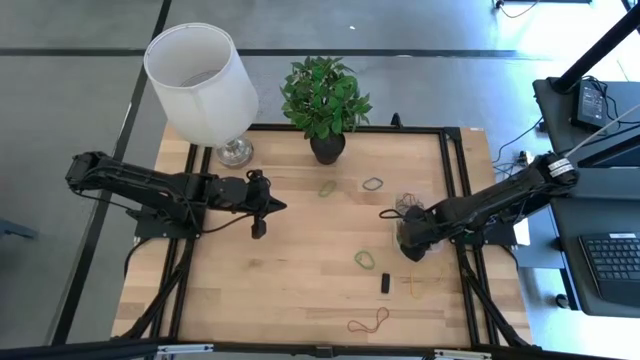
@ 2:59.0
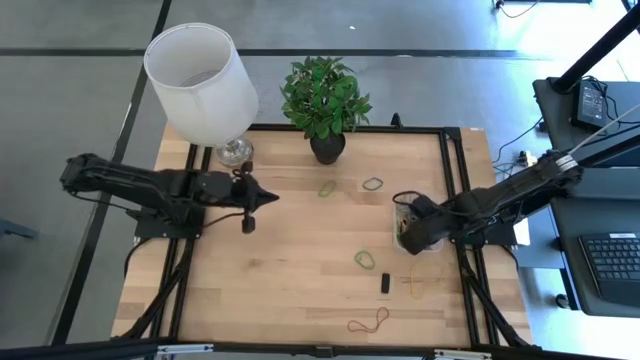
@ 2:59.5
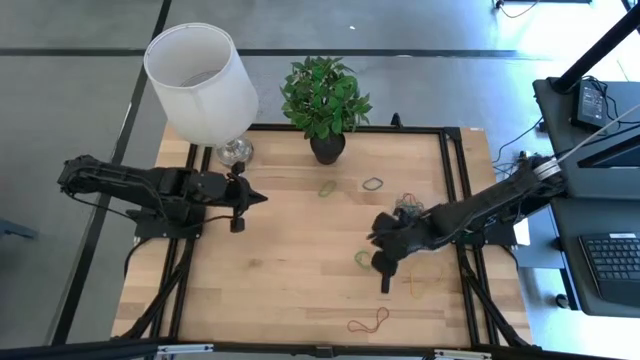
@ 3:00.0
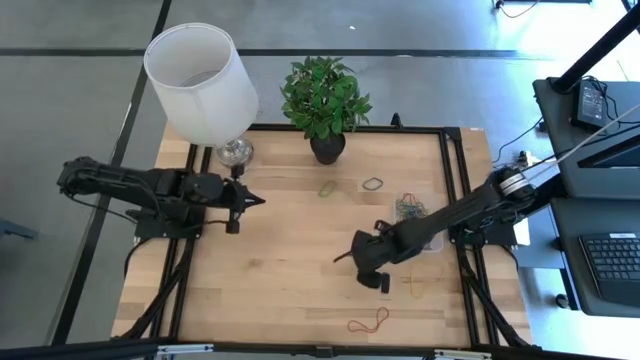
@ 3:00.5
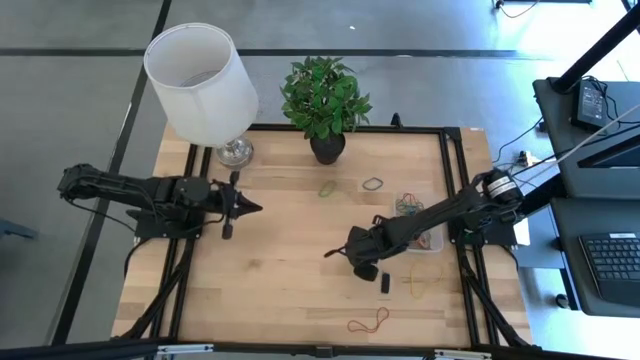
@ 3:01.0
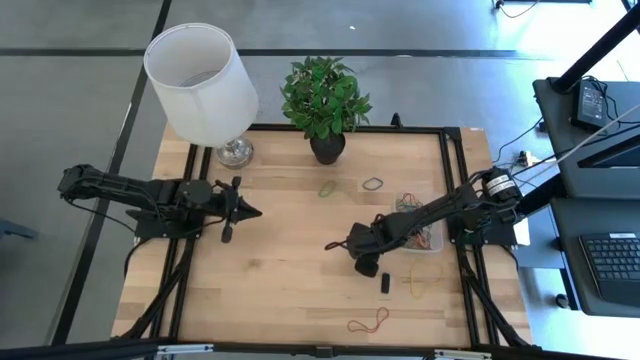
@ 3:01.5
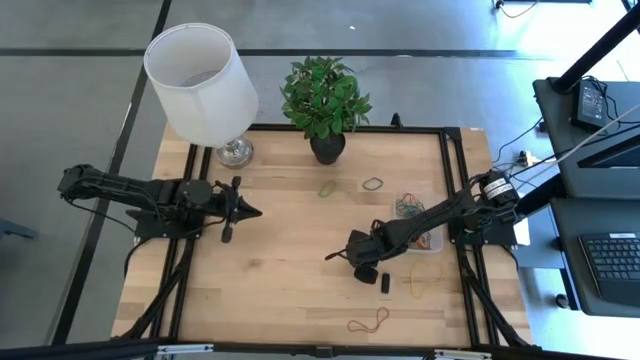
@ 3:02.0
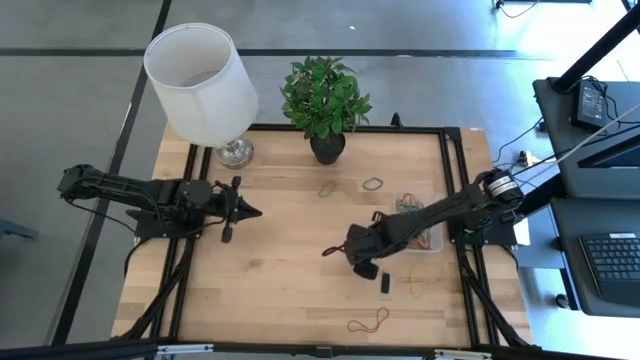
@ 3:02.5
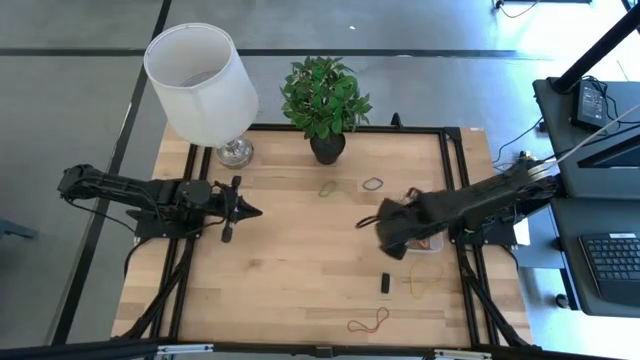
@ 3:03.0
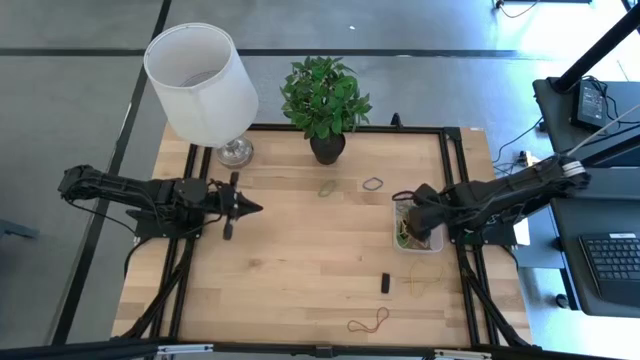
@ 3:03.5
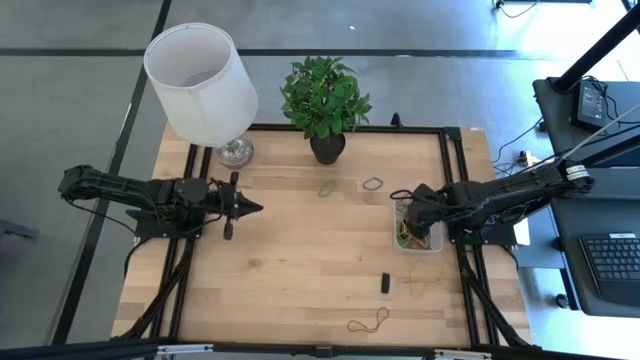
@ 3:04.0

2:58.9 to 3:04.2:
Task: Pick and place rubber bands into bin
Put the green rubber band into the transparent bin

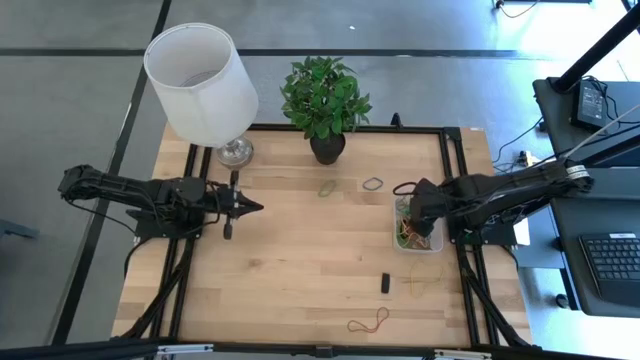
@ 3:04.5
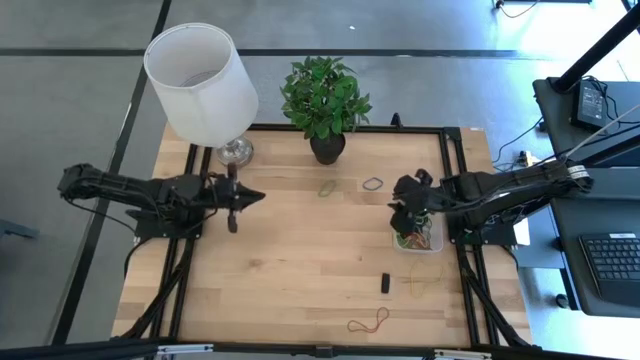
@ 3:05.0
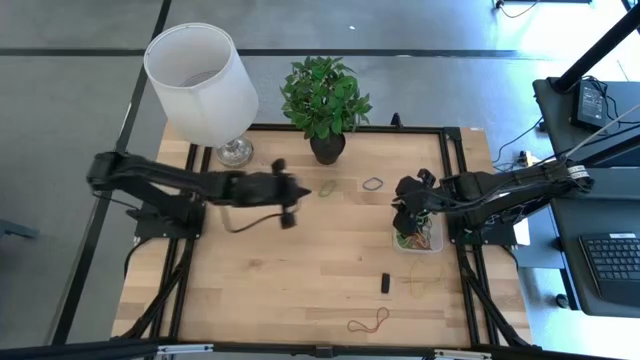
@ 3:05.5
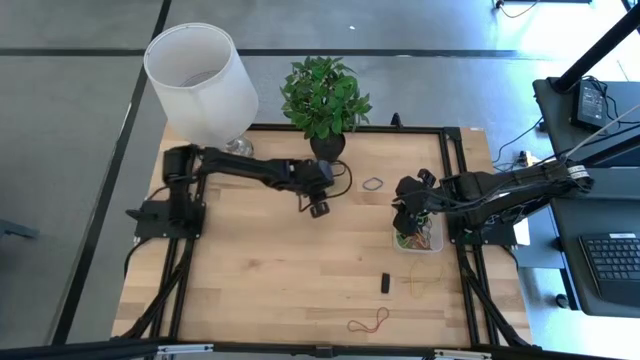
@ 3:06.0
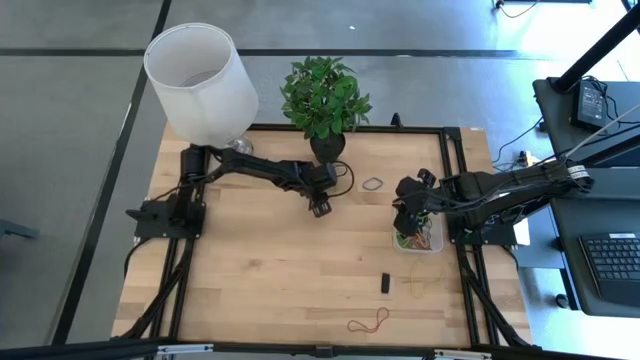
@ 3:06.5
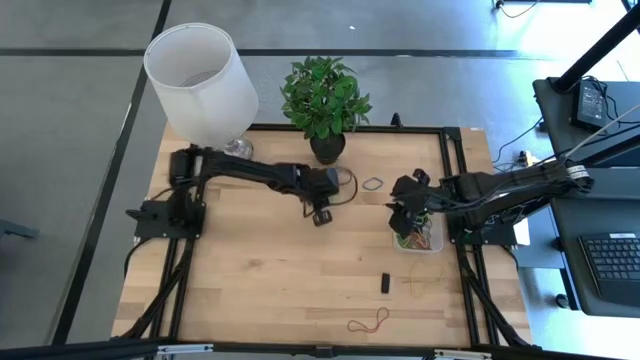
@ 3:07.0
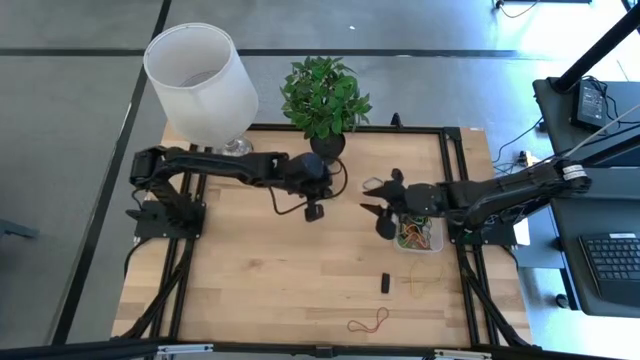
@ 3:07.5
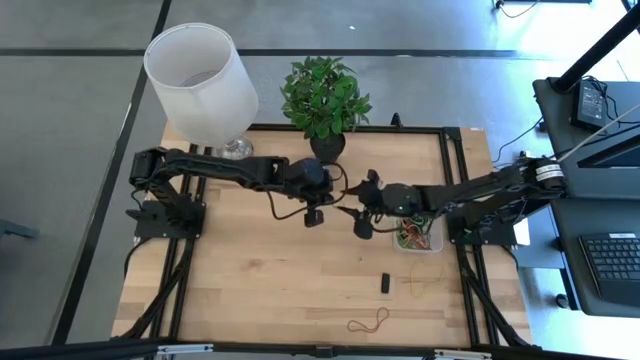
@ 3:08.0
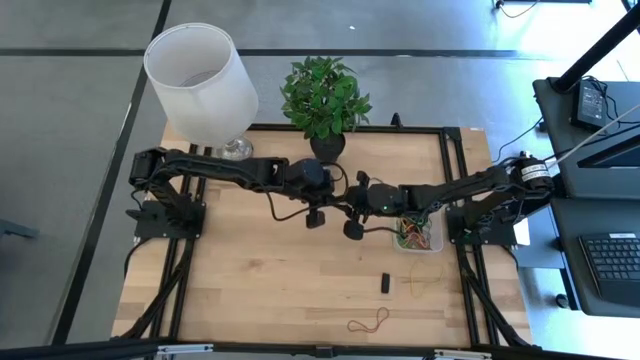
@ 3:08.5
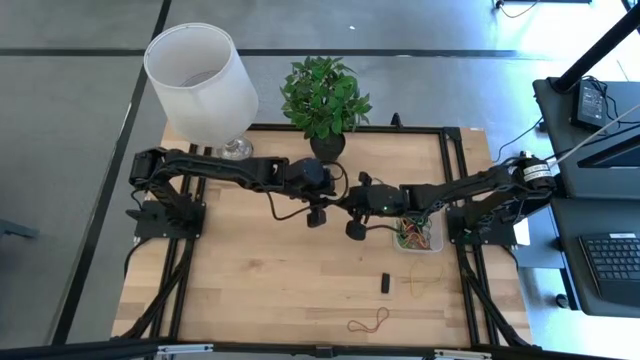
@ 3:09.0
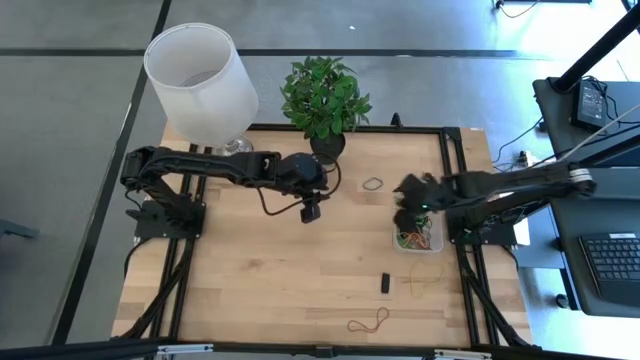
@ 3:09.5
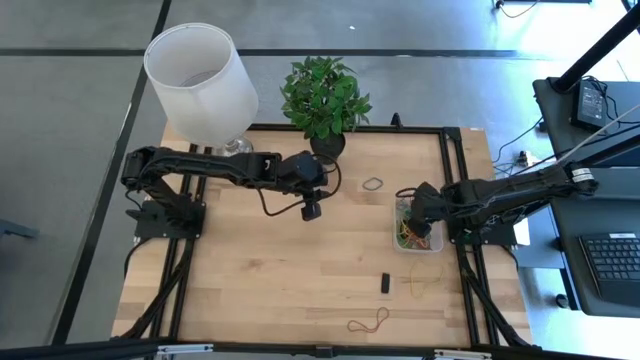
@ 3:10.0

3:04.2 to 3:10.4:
Put the green rubber band into the transparent bin

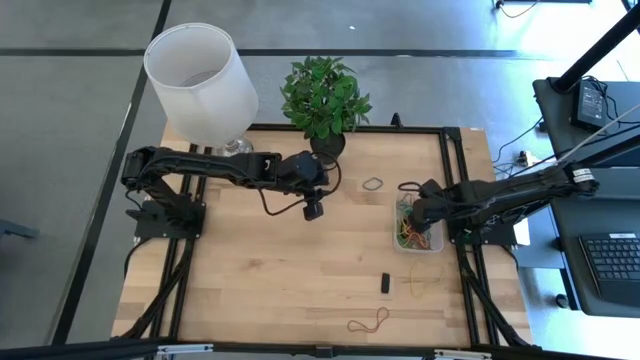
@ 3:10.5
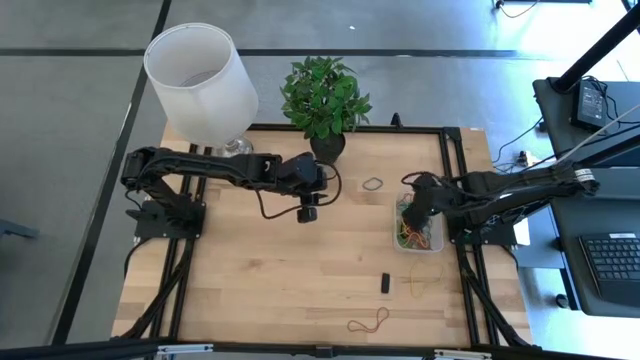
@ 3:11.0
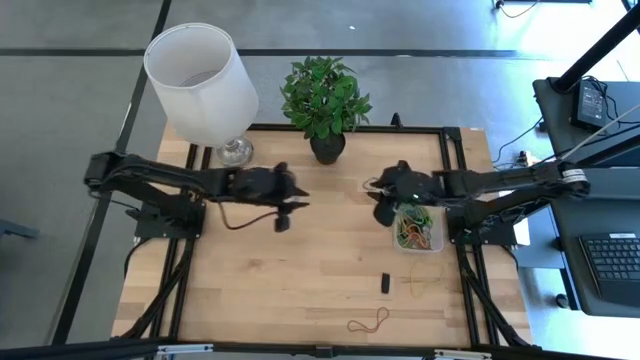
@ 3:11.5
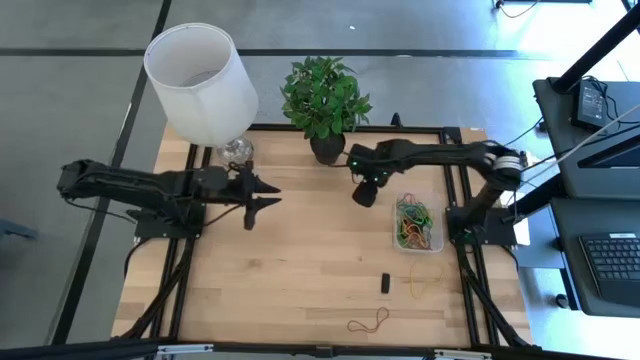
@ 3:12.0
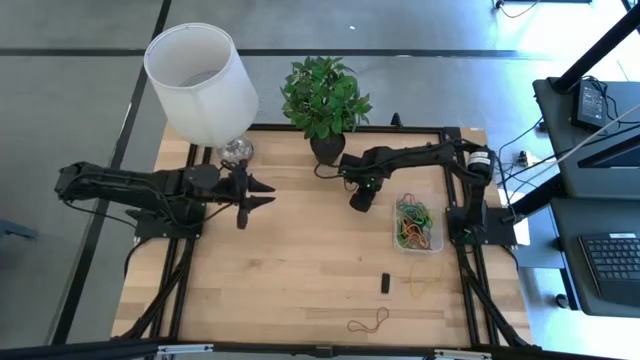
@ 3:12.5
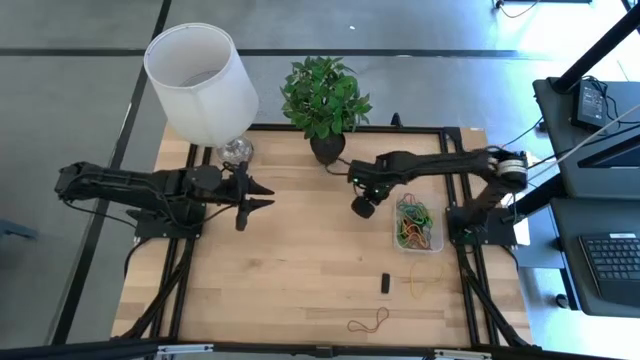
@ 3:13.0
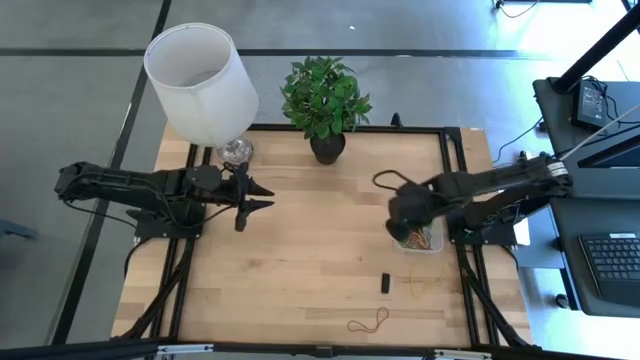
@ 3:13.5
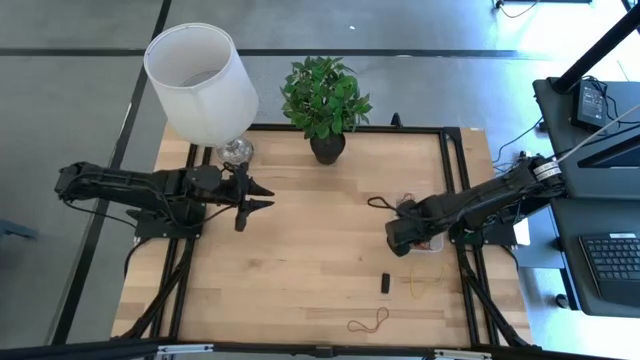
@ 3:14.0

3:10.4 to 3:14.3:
Put the blue rubber band into the transparent bin

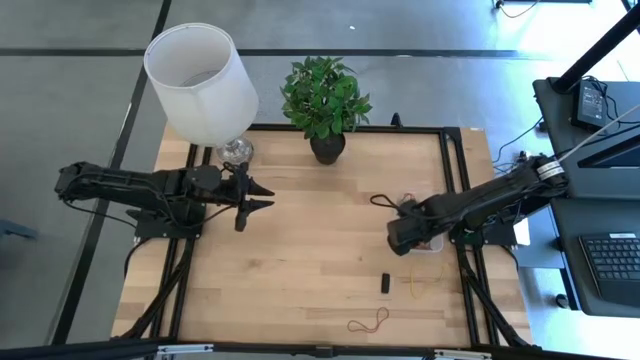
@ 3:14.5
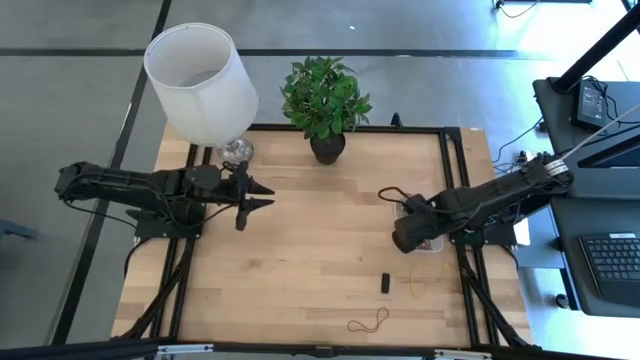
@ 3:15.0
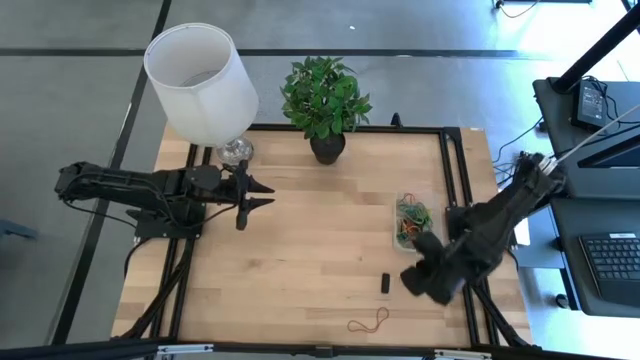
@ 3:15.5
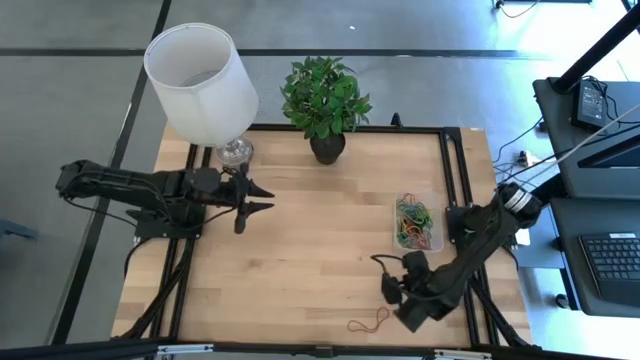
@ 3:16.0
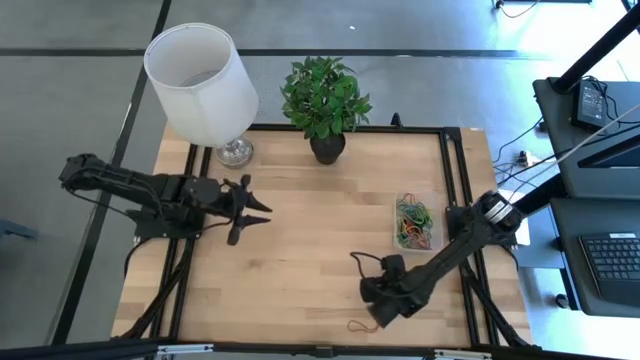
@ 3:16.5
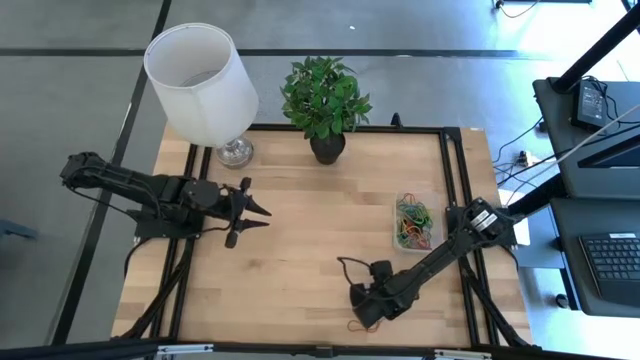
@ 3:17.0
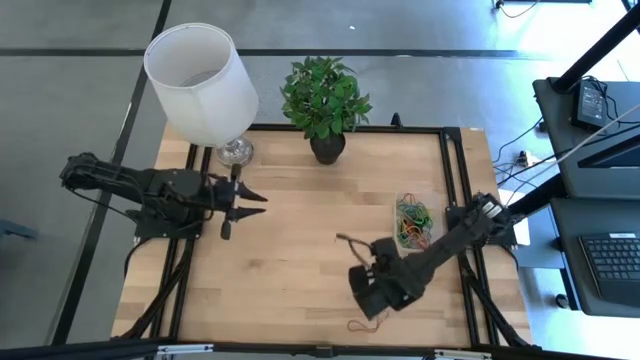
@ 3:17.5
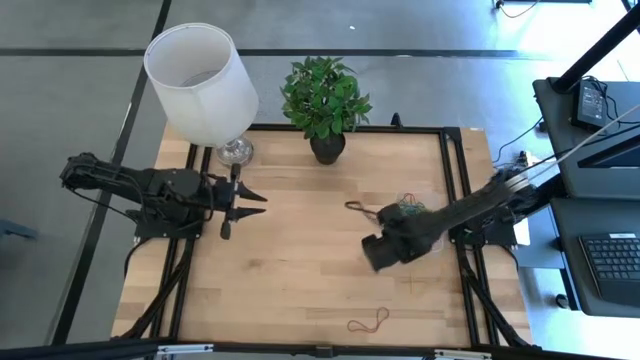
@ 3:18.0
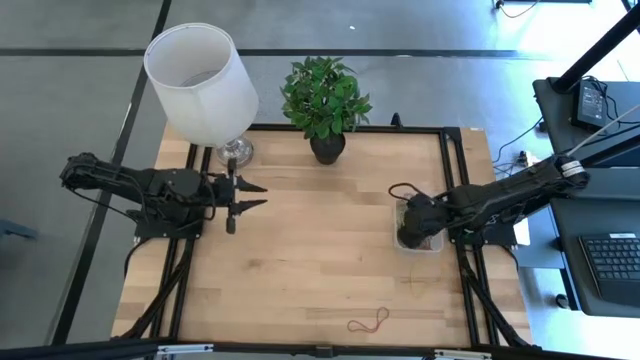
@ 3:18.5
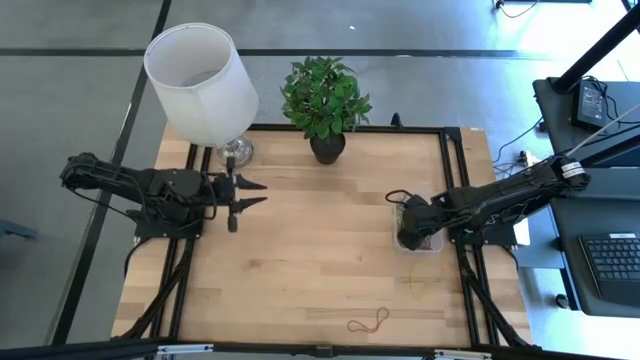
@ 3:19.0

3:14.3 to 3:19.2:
Put the black rubber band into the transparent bin
